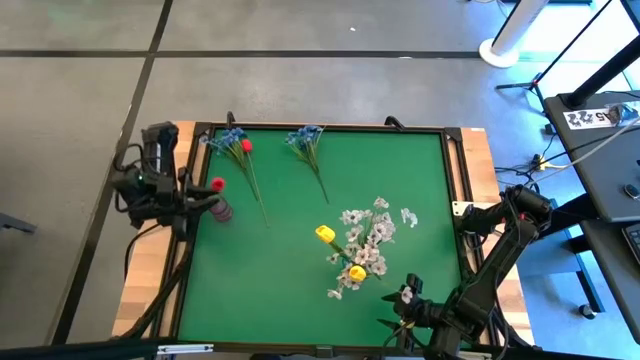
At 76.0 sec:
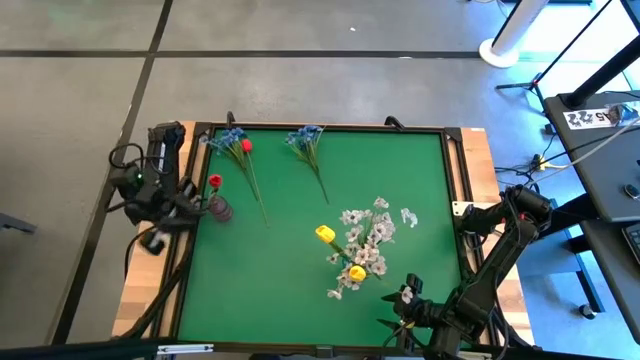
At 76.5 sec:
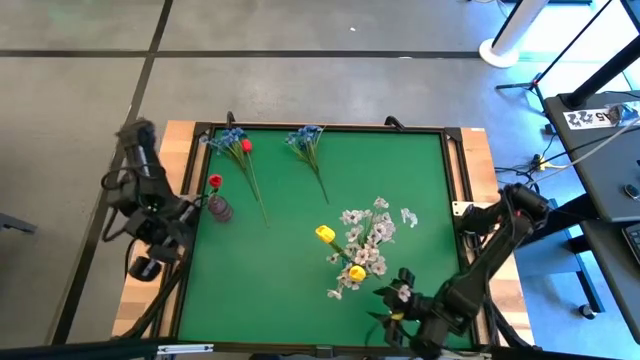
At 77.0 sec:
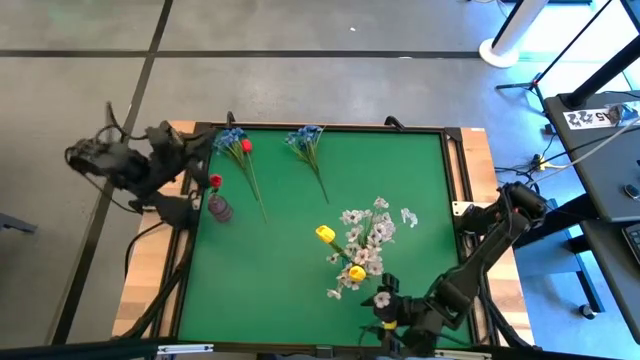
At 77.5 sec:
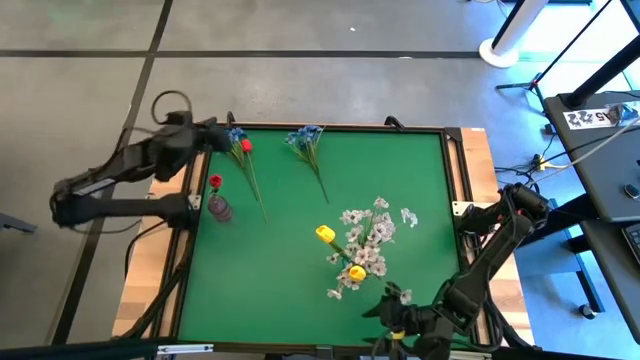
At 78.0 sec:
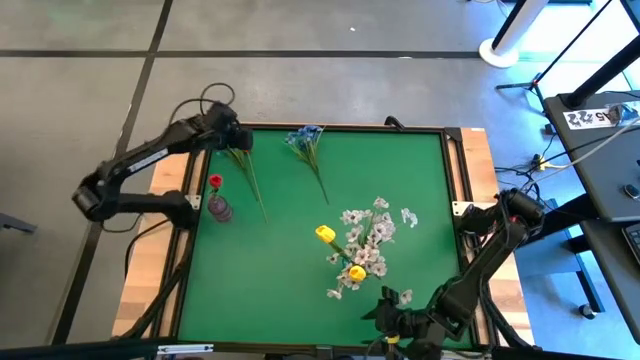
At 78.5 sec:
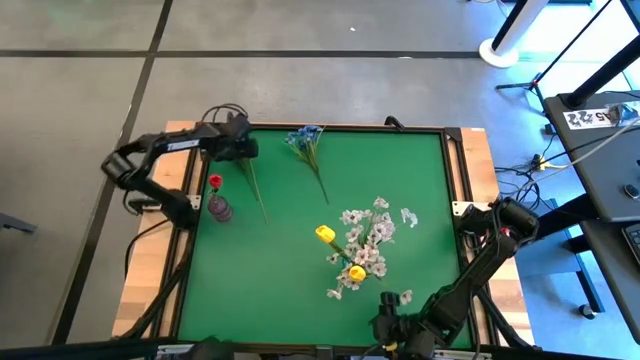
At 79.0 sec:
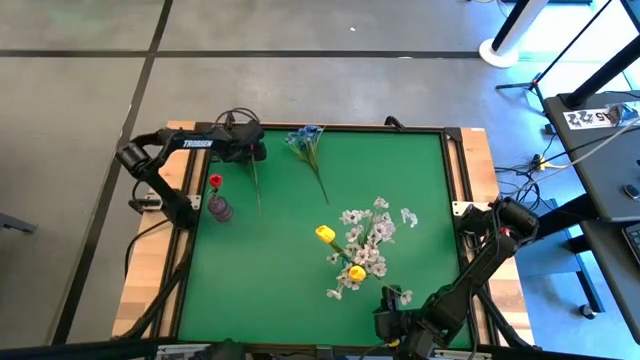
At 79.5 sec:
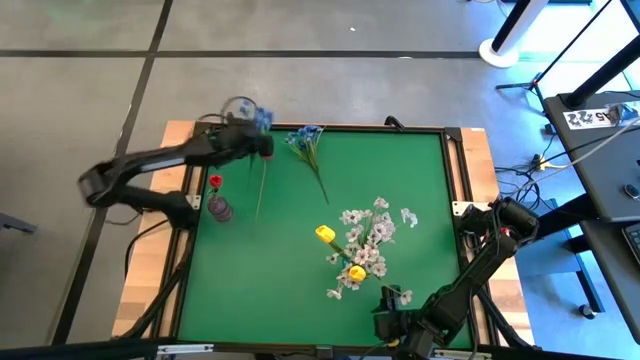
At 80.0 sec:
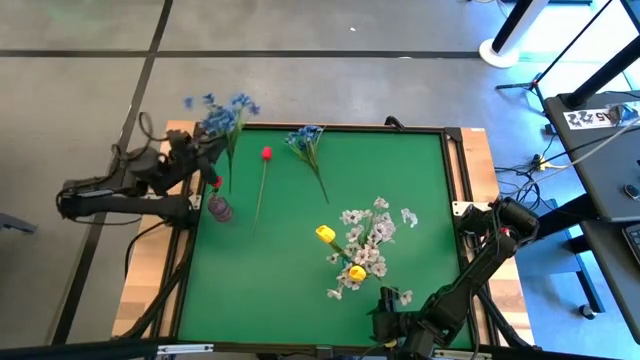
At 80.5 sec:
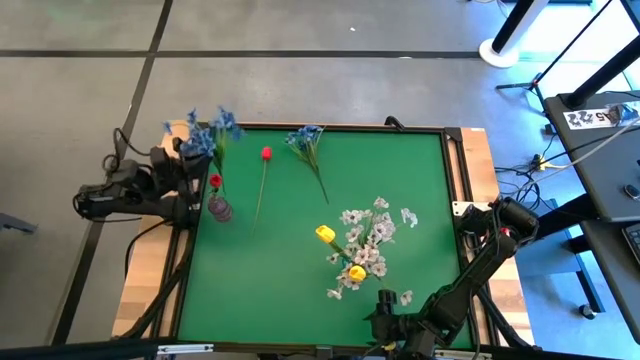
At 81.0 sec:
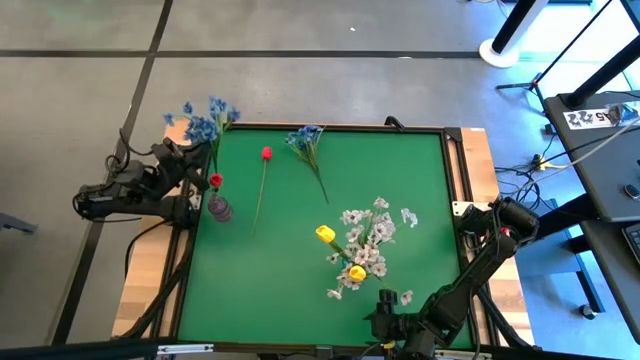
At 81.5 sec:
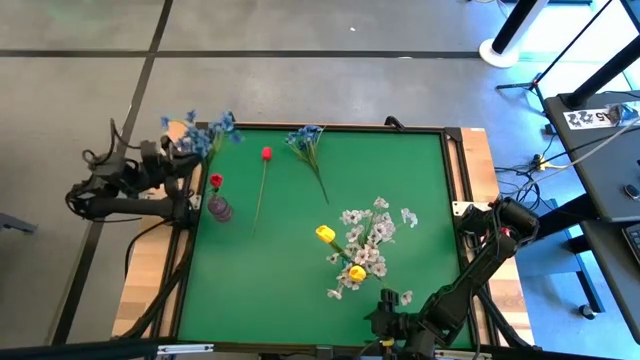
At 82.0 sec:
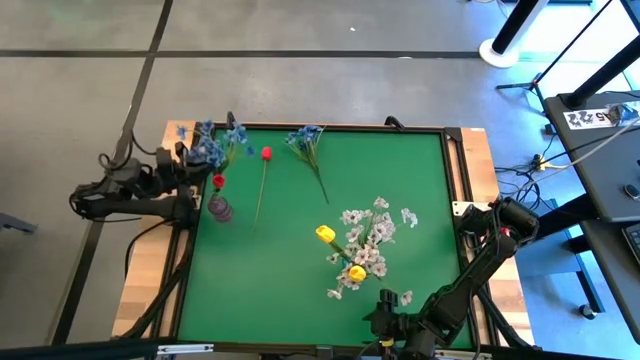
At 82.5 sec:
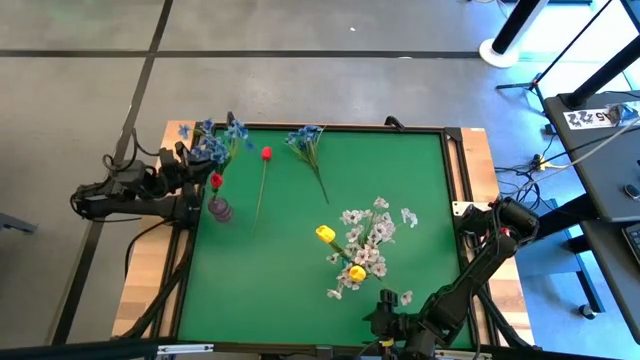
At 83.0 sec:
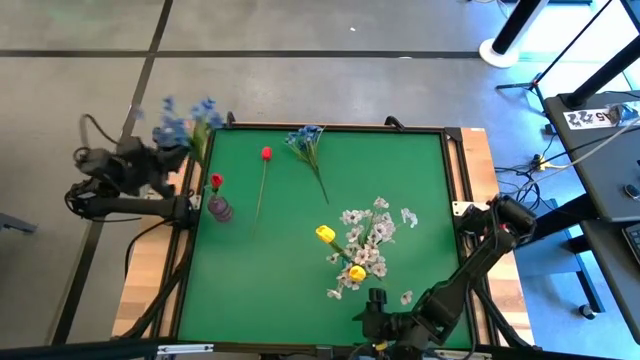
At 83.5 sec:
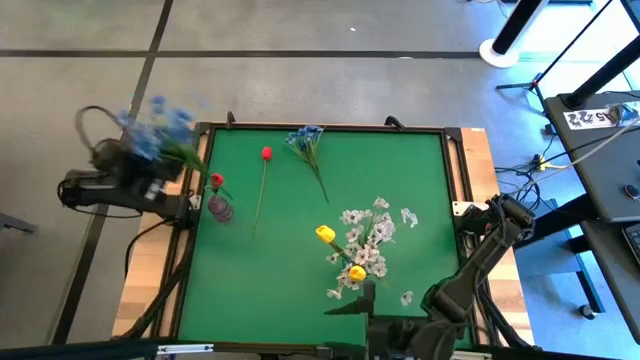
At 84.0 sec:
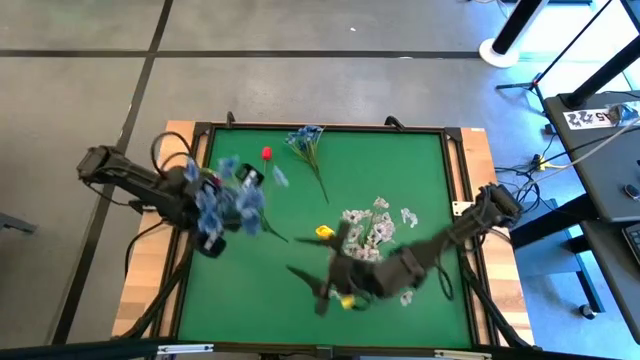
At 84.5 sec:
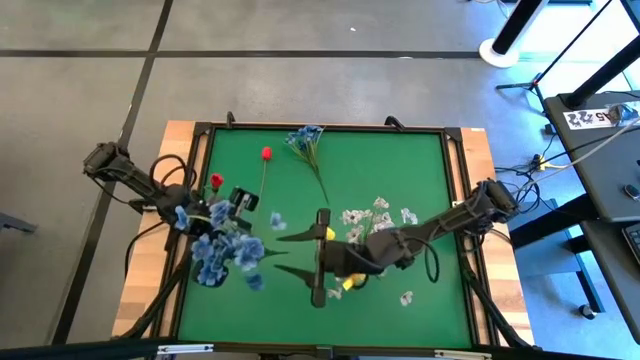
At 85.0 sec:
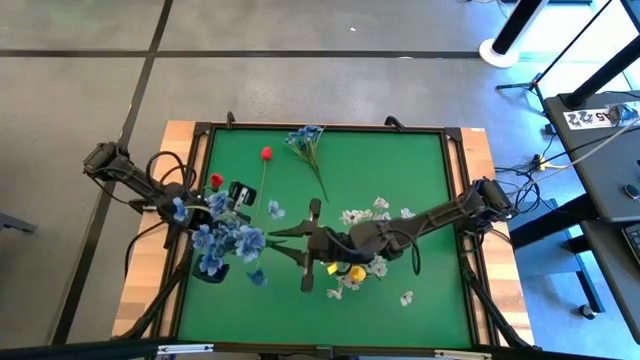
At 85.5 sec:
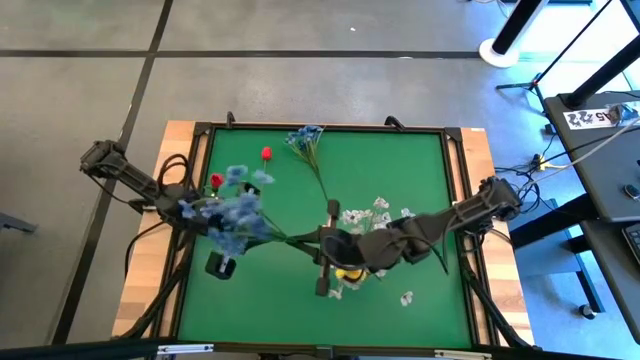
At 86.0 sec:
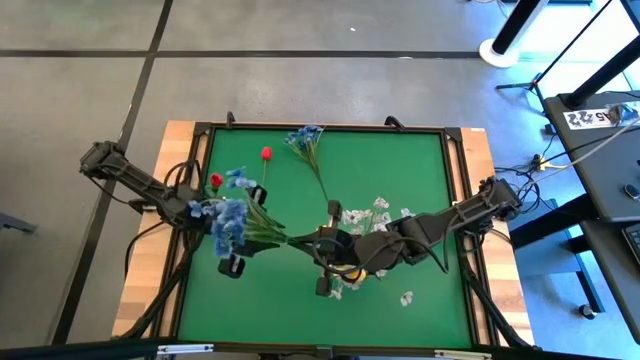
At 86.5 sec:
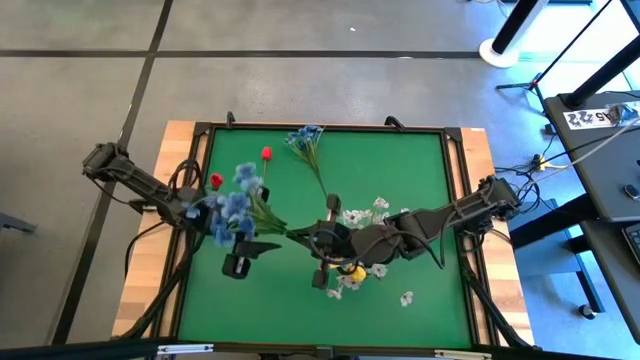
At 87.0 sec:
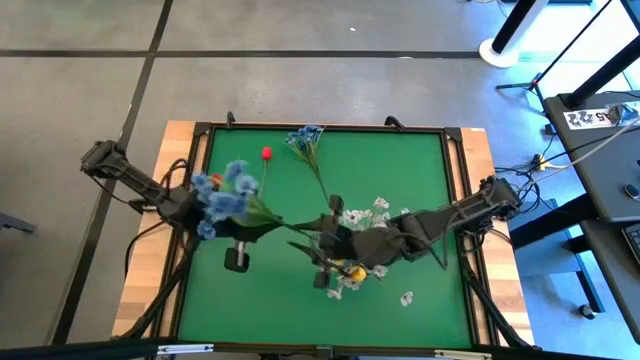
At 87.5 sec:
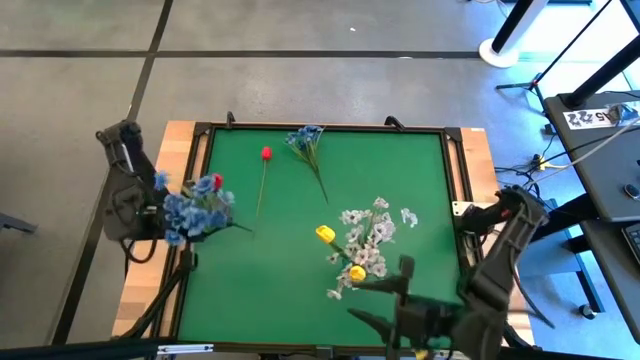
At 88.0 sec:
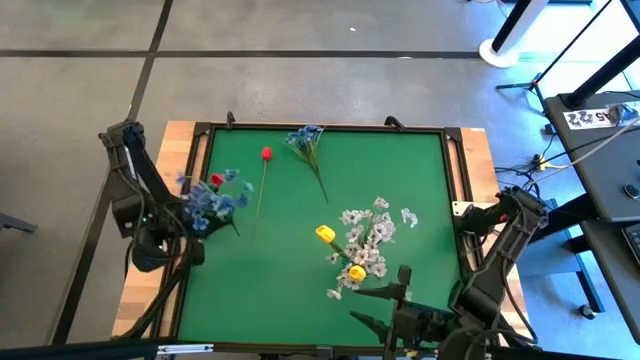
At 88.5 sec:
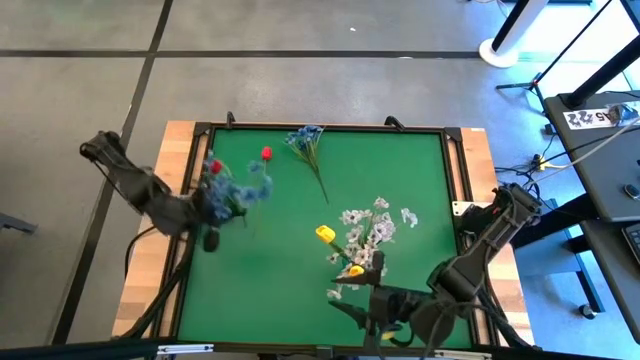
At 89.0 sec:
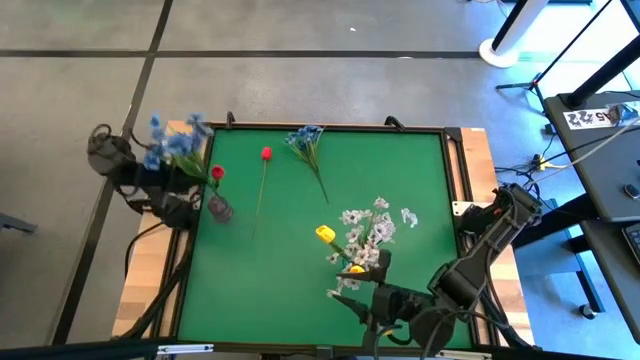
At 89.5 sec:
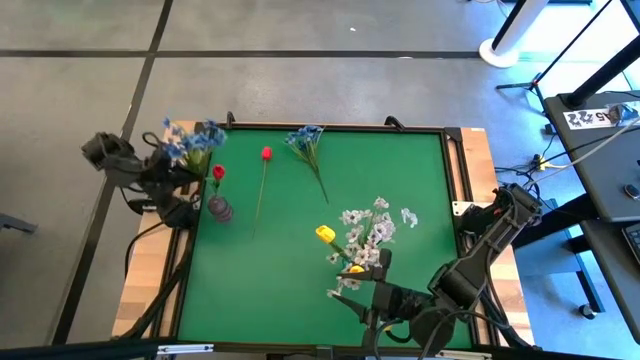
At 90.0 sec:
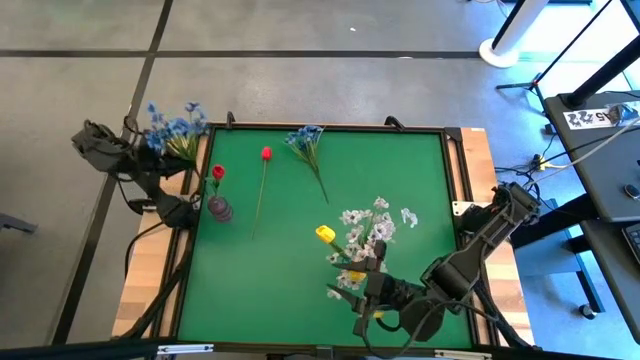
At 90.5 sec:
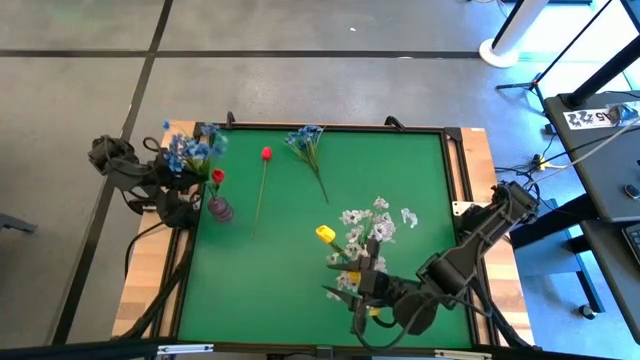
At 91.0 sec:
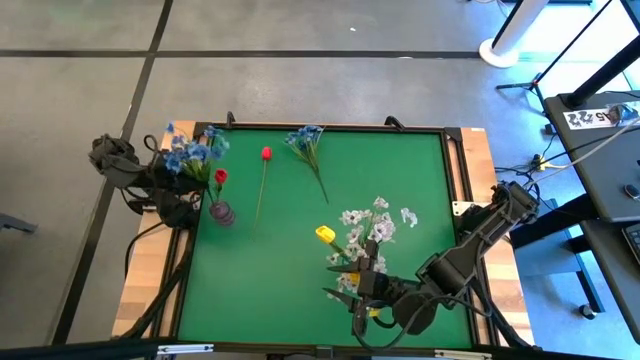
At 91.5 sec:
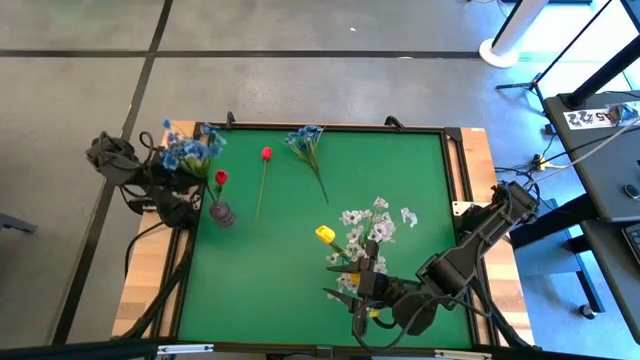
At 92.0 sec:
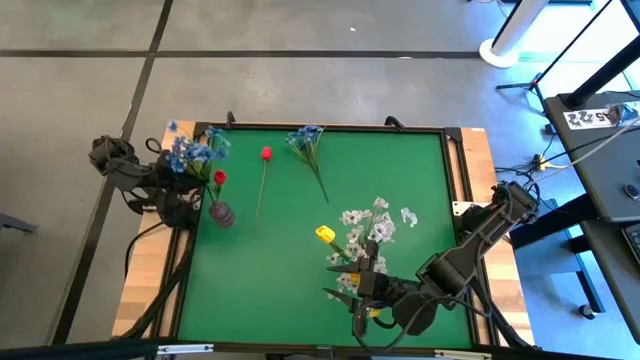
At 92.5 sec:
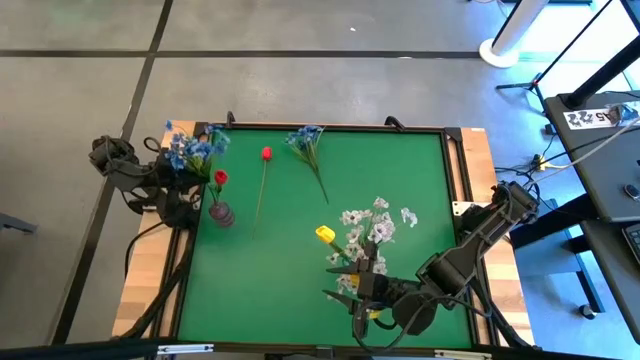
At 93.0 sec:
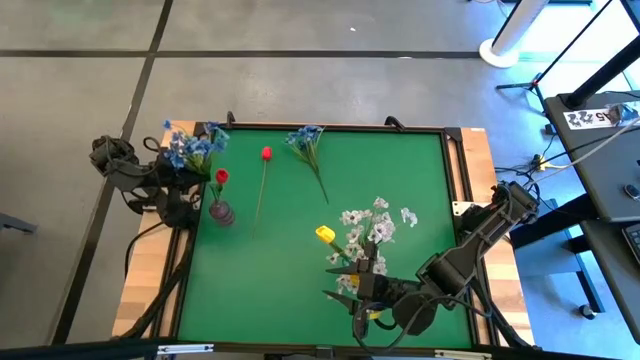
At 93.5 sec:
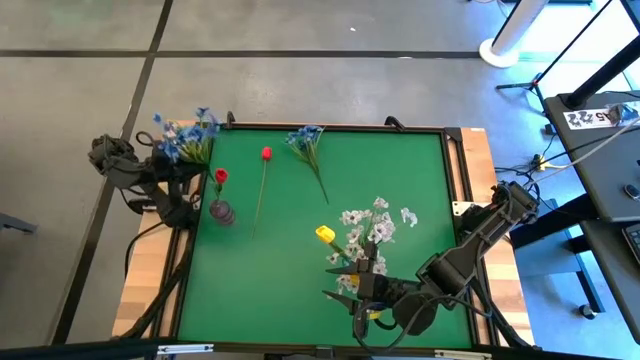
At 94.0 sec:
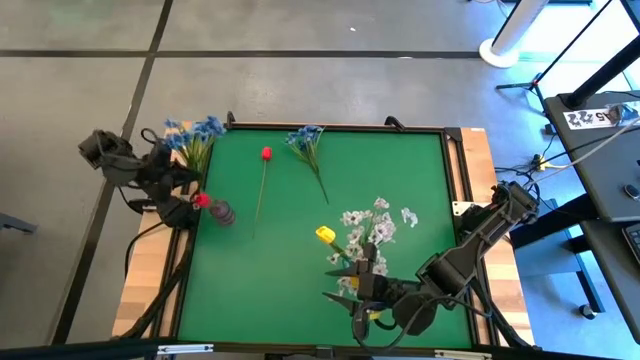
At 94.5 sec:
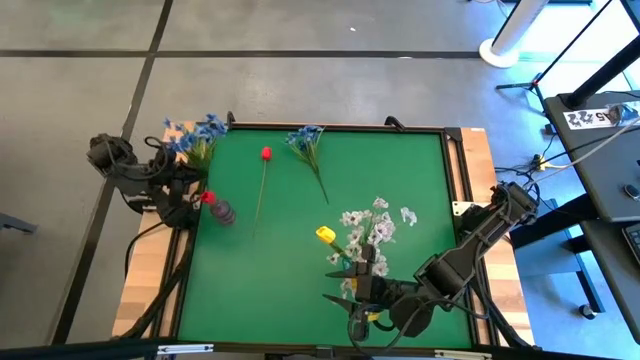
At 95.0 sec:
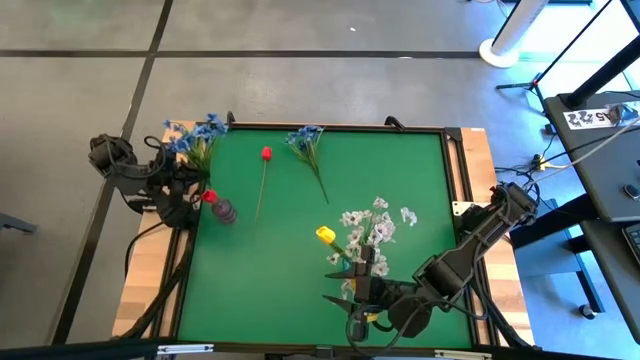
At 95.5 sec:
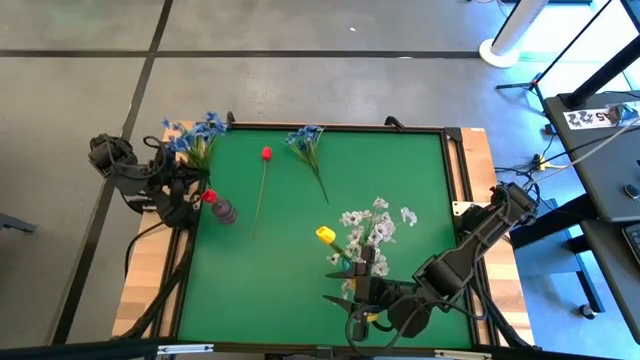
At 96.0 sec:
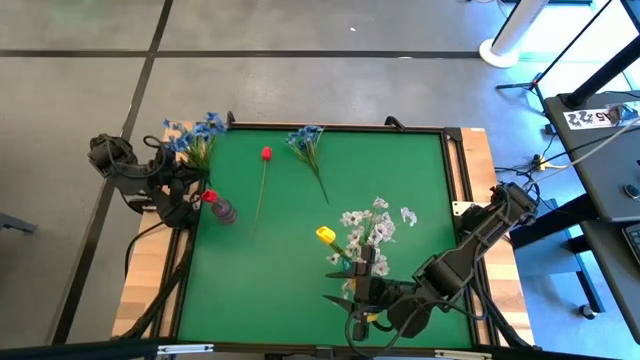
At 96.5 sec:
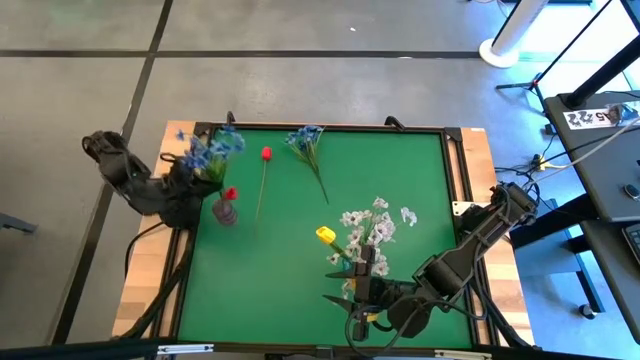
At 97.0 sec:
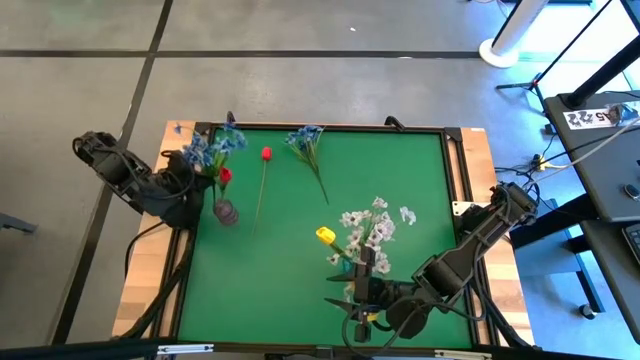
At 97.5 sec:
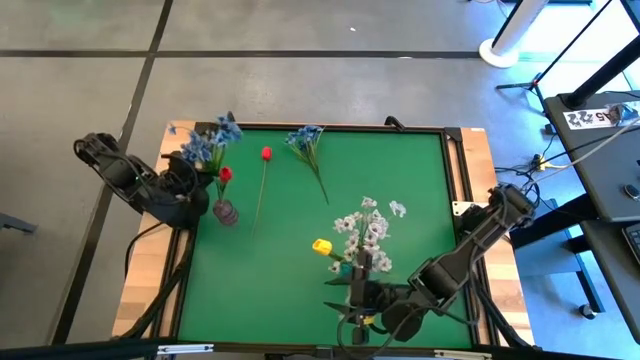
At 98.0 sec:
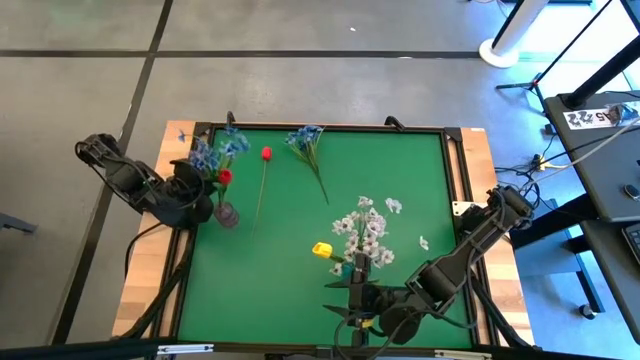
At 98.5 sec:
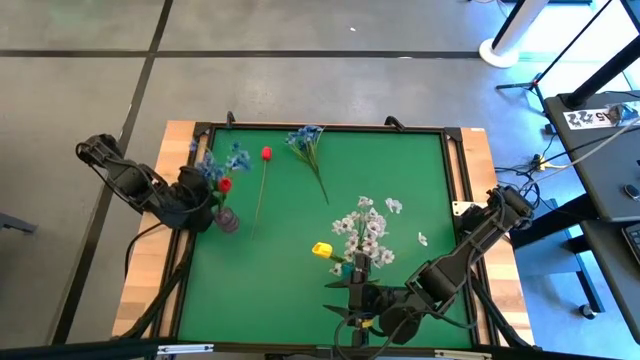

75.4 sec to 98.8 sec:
Task: Sort flowers into vase by color
Put the left blue flower into the purple vase
